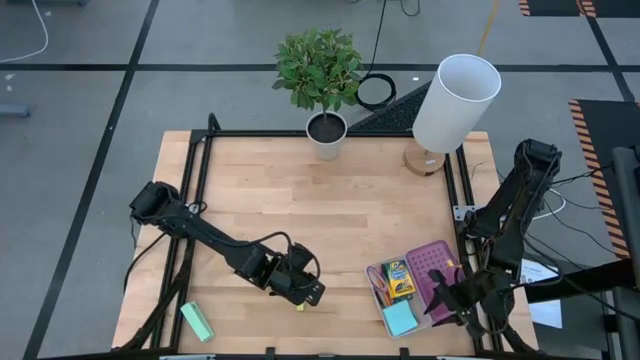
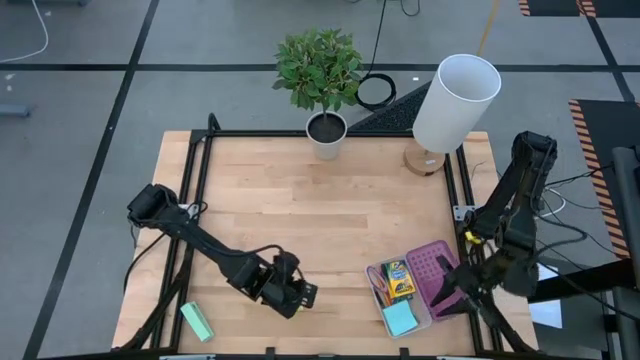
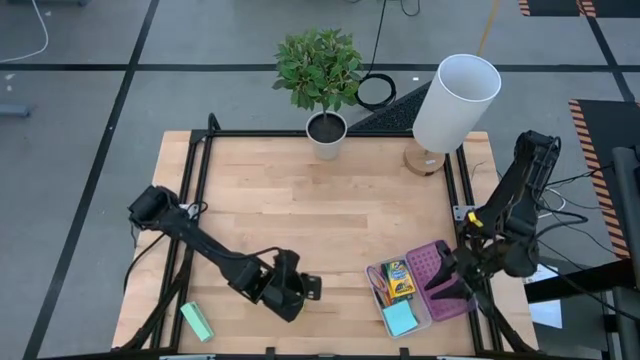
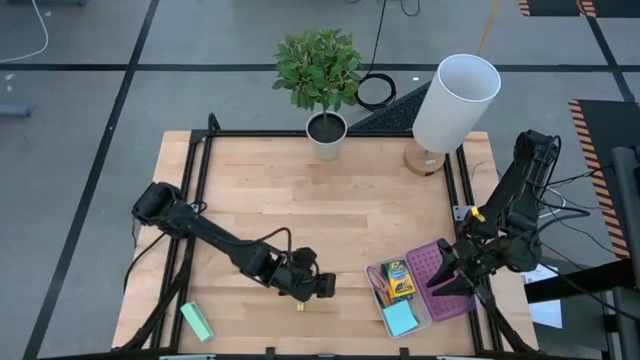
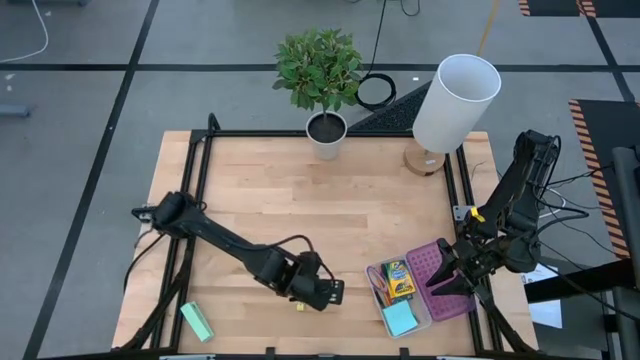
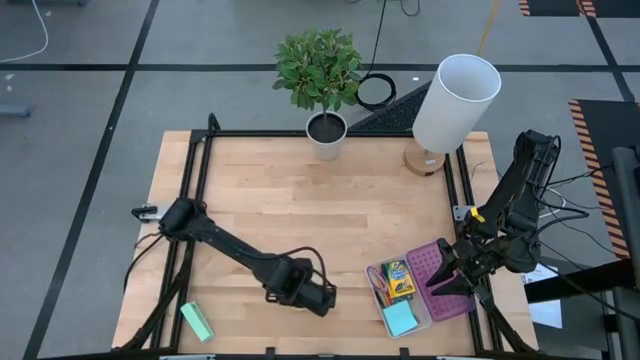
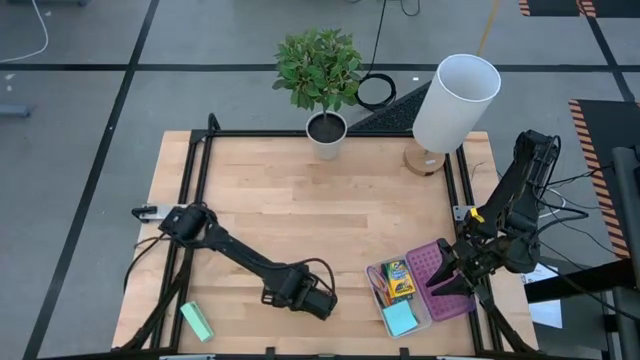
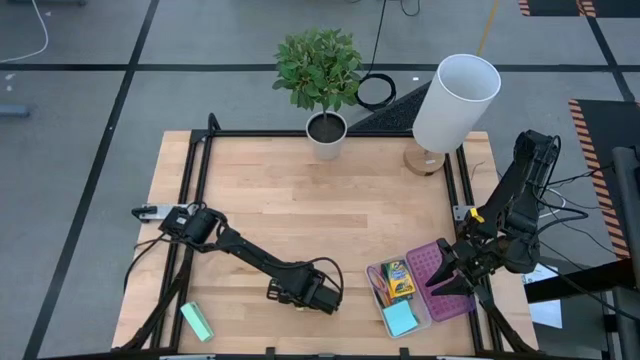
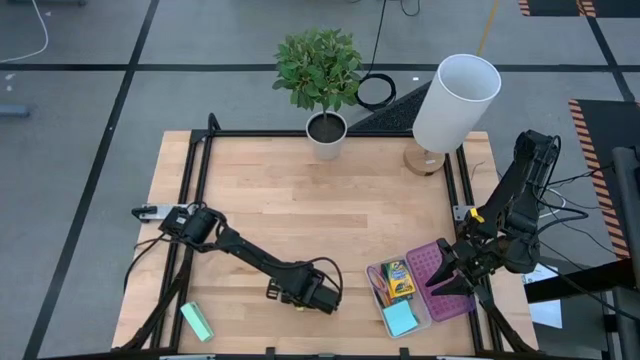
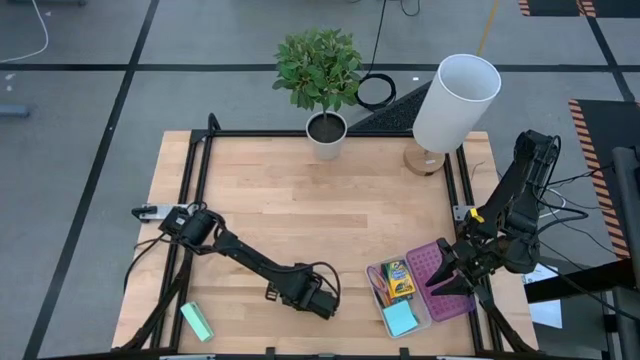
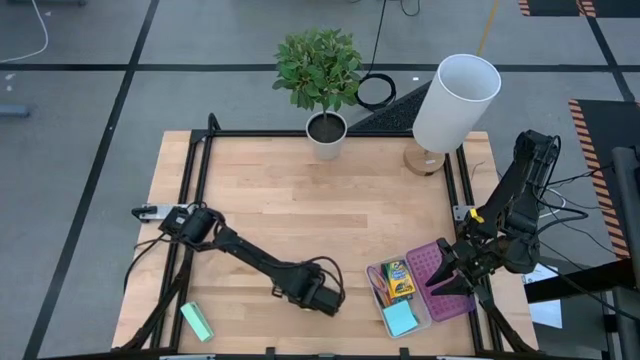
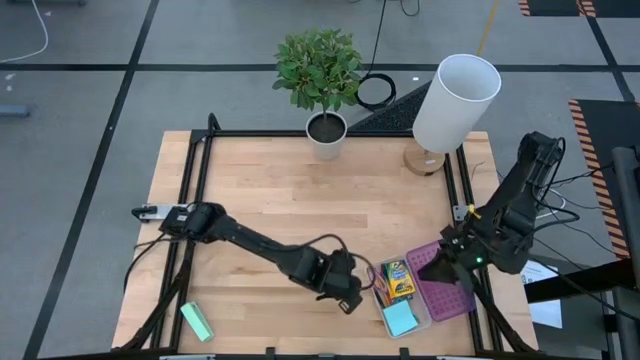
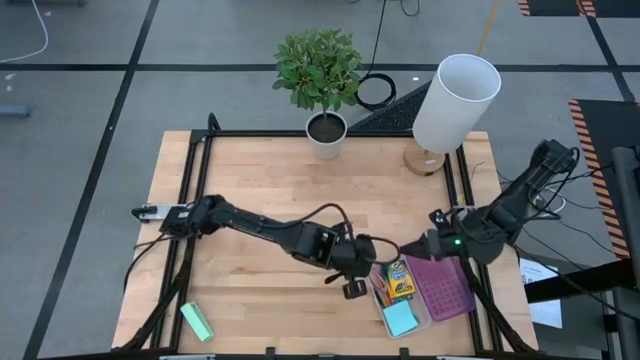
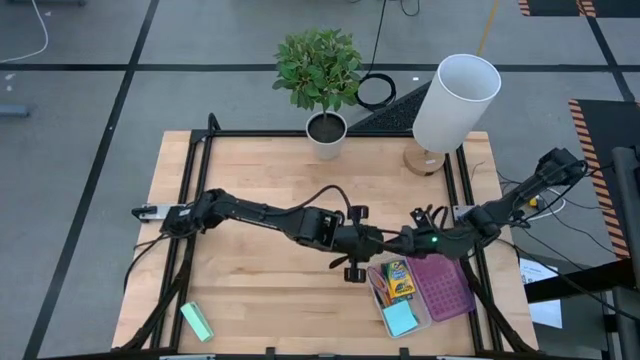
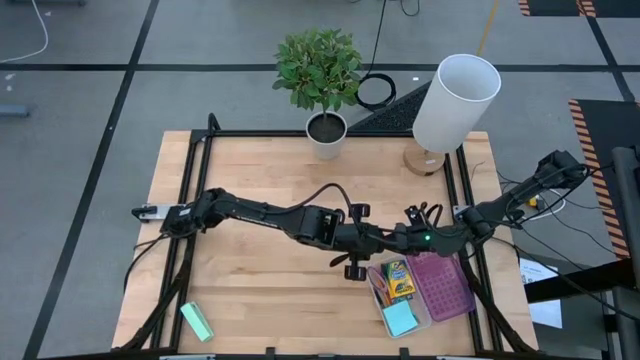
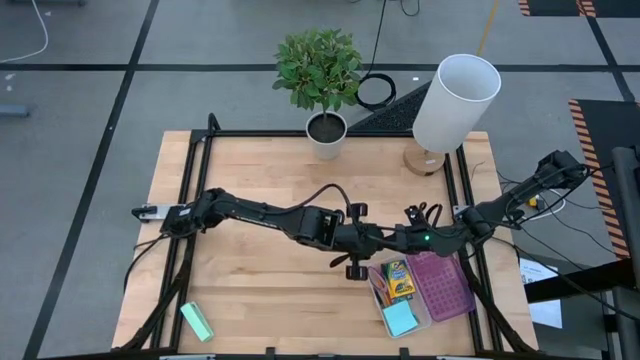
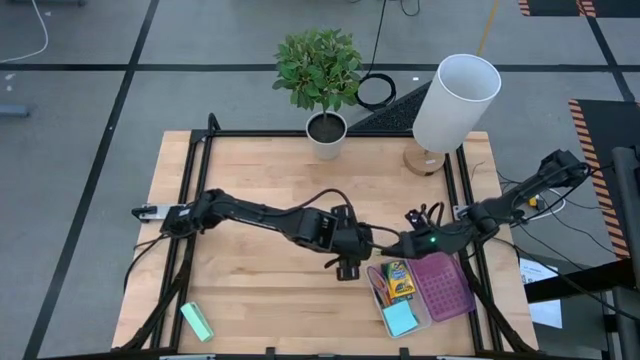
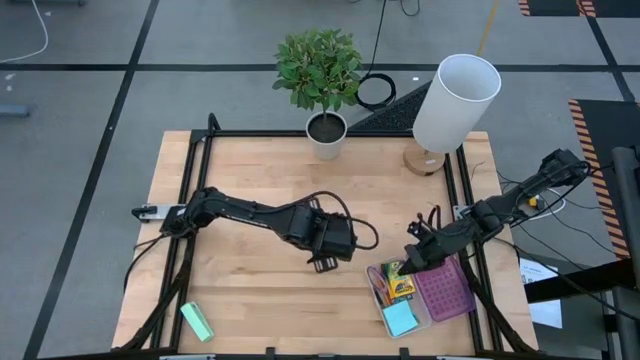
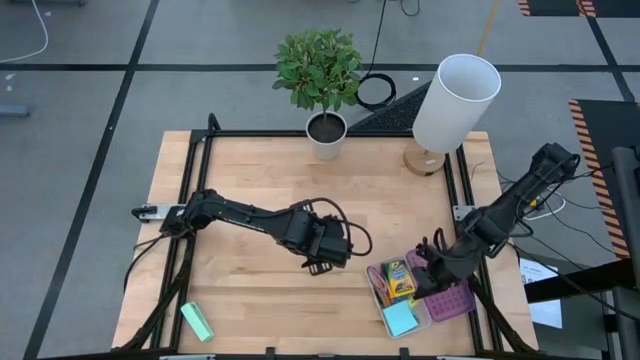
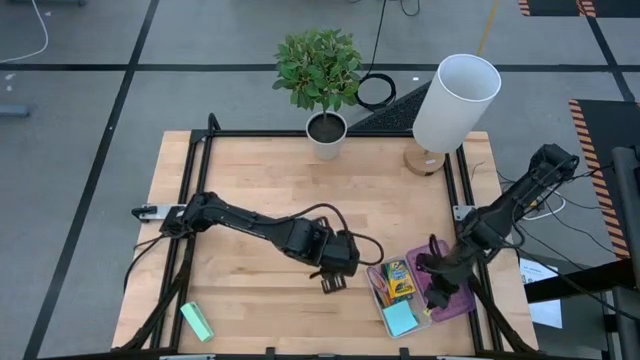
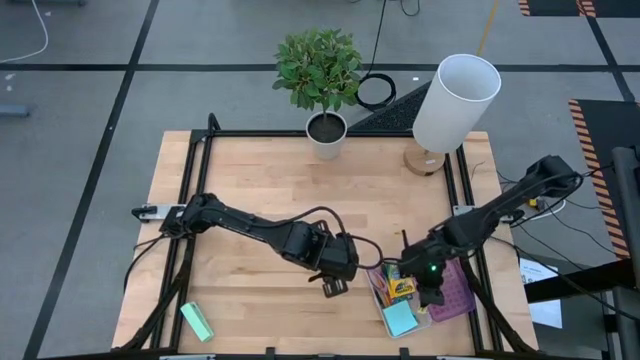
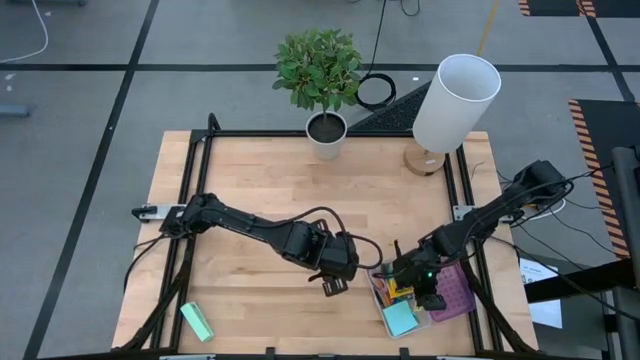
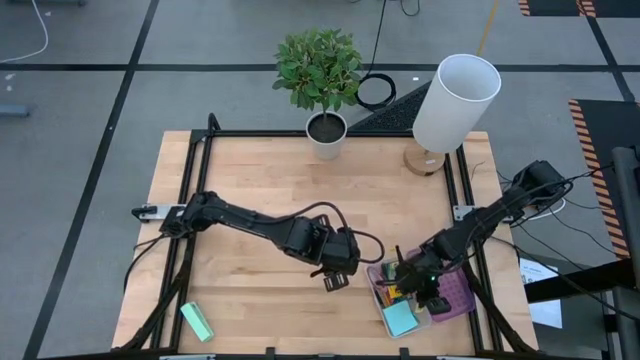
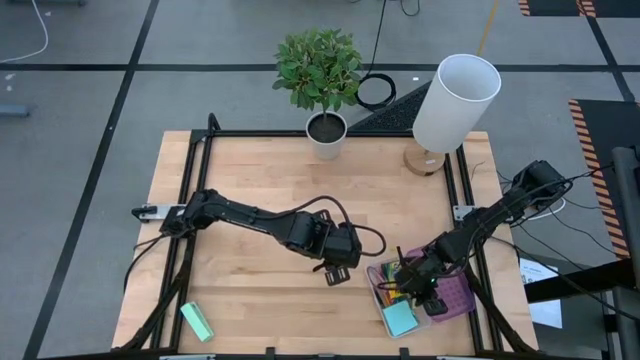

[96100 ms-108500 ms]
Task: Pack school essentials
Put the green eraser into the purple supply box
